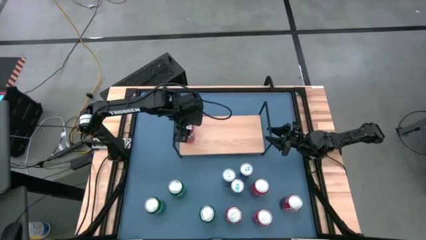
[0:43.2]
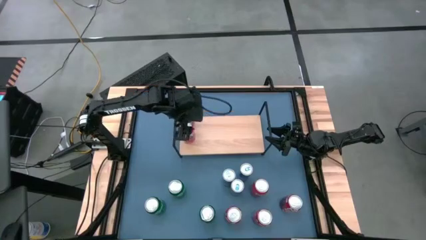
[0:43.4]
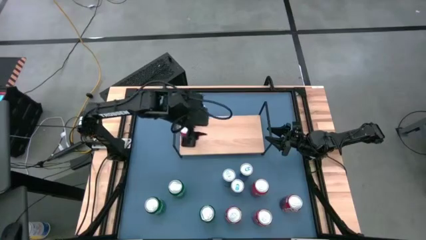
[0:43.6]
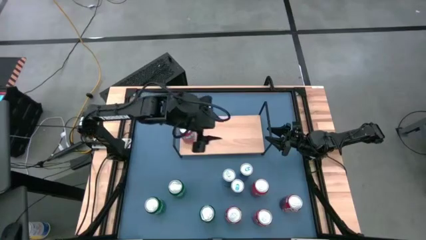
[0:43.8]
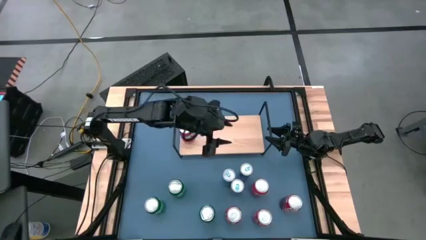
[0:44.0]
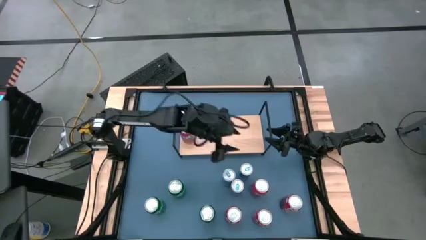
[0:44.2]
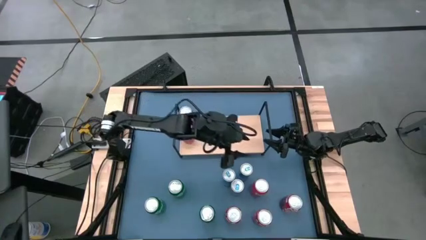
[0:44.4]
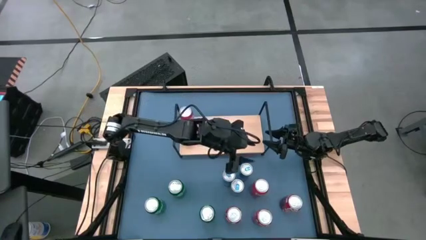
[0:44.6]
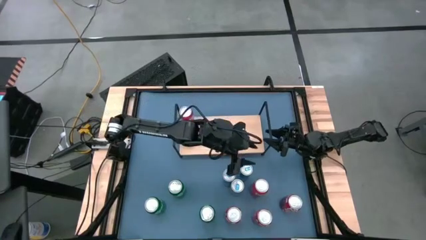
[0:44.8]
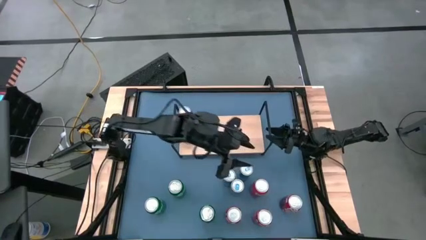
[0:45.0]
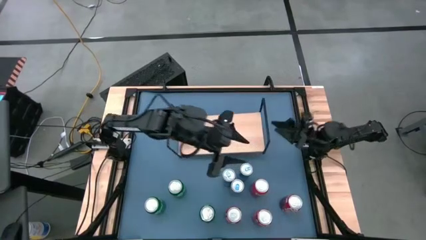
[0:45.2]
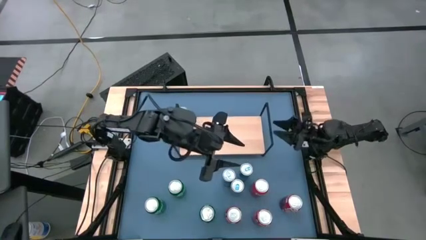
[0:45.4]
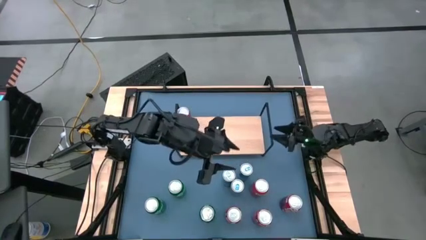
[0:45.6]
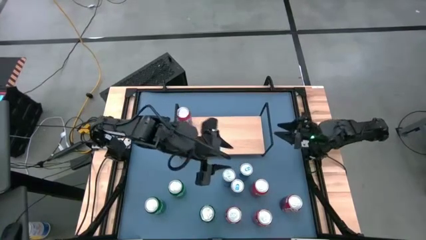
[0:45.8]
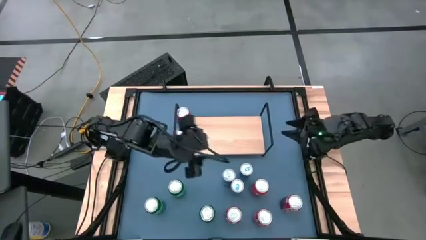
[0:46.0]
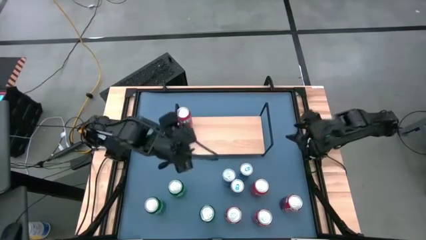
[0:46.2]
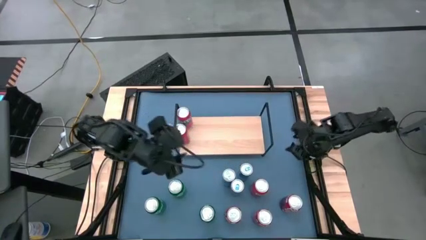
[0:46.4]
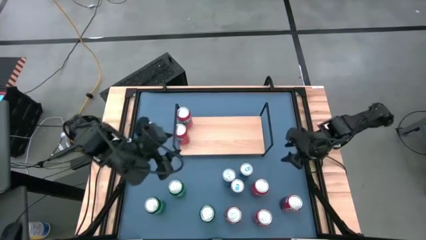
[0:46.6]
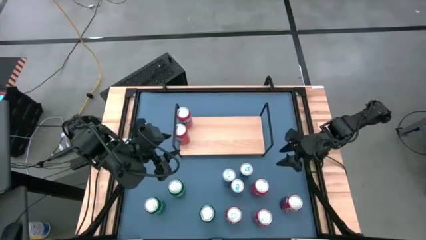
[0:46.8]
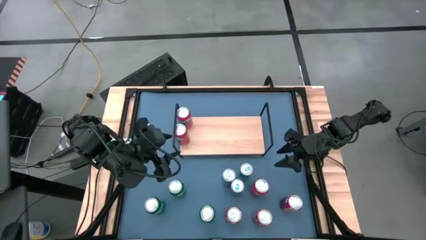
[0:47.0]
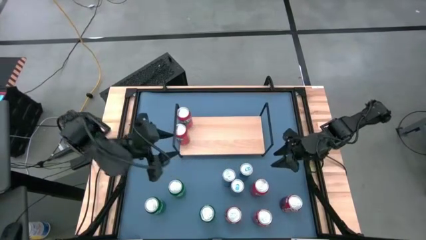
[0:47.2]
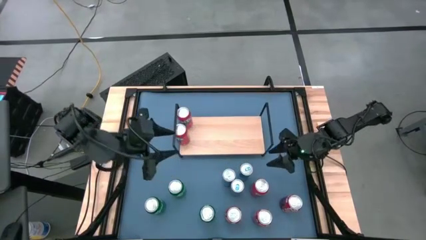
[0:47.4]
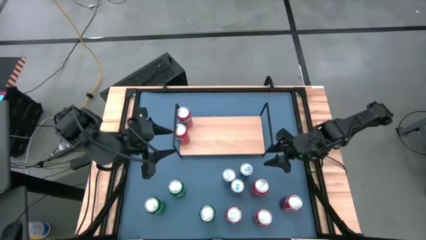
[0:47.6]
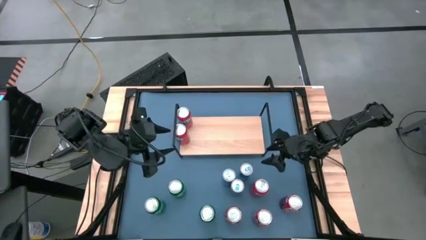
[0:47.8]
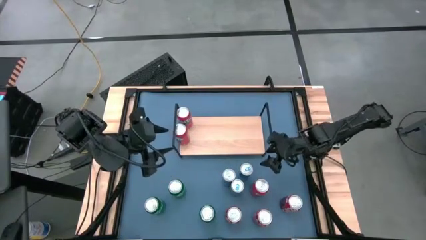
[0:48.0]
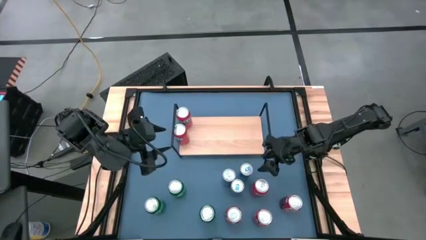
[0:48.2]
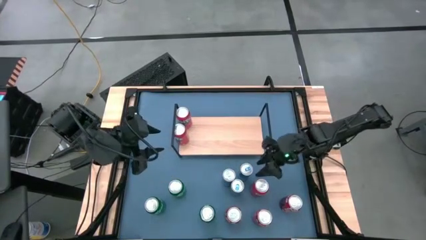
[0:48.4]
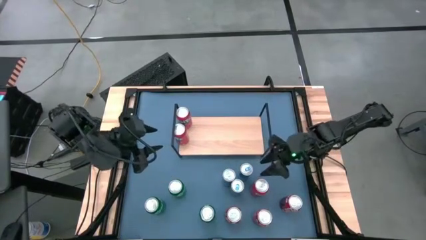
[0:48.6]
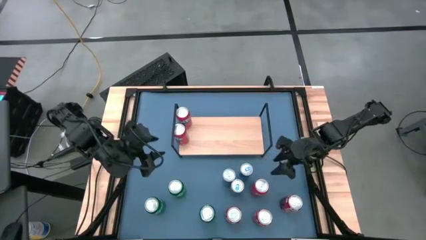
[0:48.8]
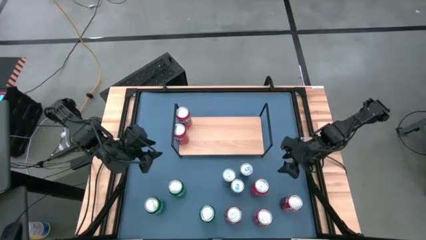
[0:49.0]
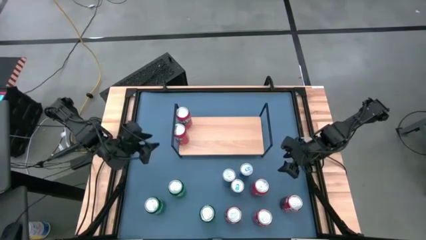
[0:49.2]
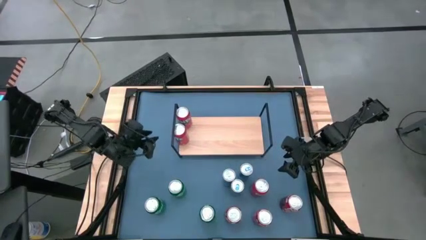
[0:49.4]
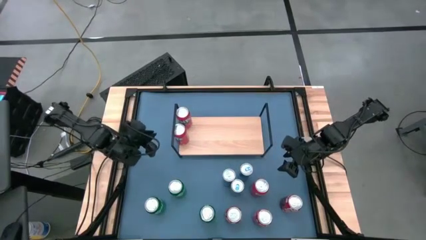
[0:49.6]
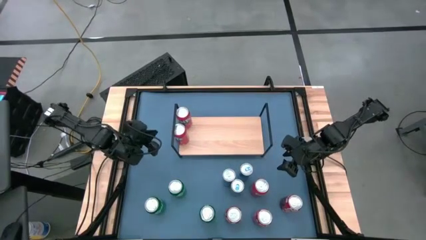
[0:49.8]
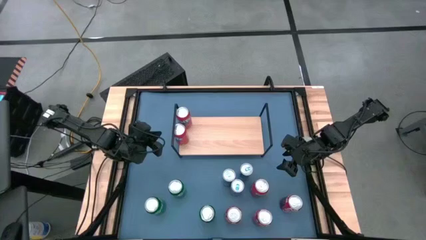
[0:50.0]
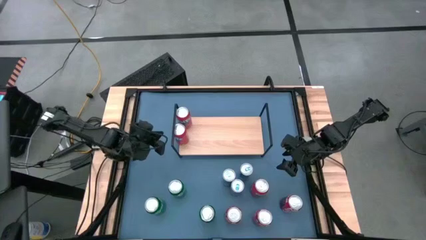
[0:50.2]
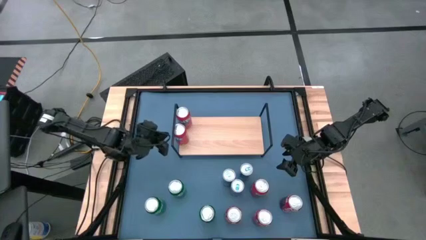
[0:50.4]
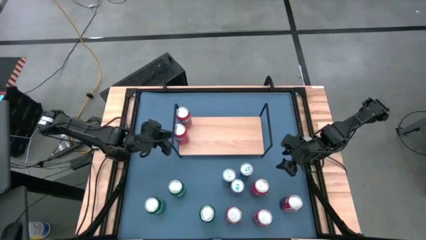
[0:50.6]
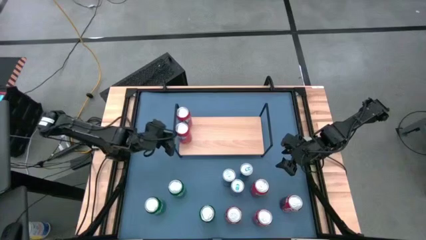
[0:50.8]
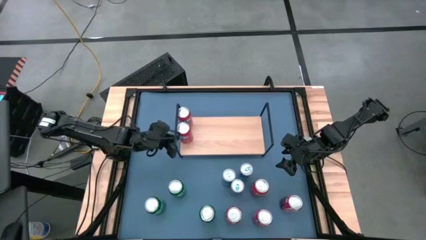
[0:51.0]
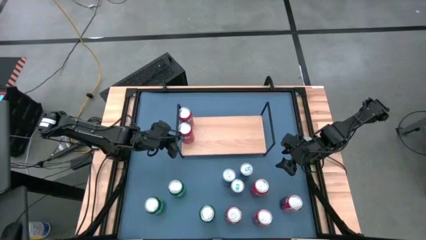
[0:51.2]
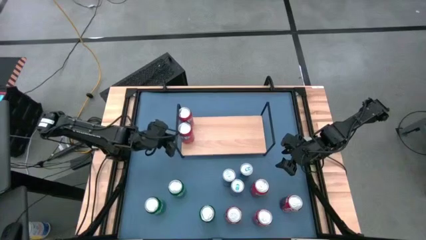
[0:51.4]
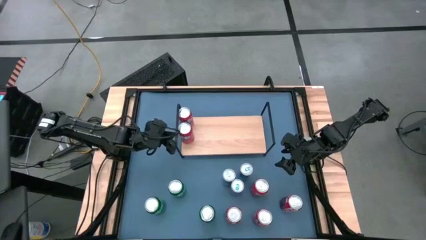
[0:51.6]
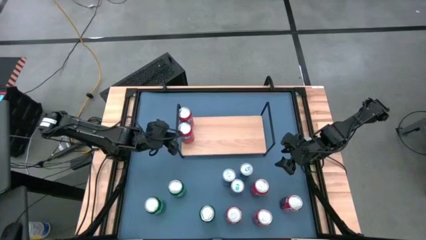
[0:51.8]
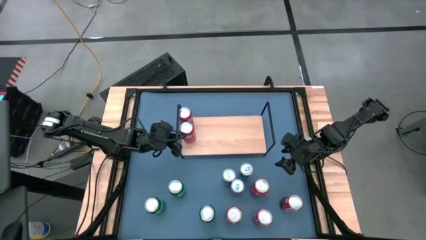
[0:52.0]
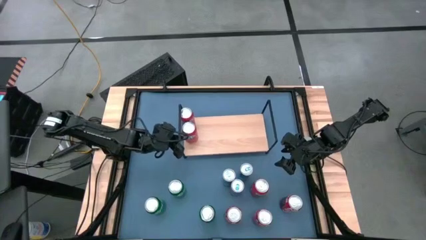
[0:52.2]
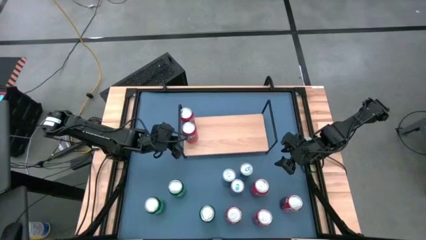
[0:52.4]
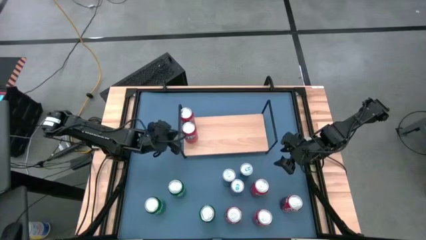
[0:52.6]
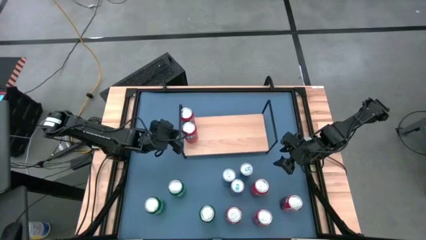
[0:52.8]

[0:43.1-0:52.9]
Task: Place canned beverage on shelf
Adjust the orange soda cans on the shelf

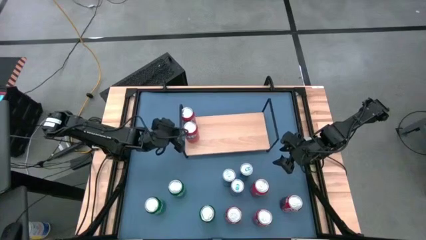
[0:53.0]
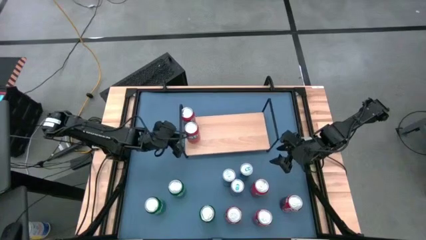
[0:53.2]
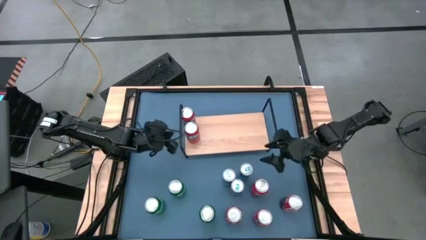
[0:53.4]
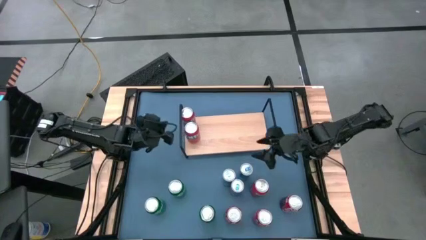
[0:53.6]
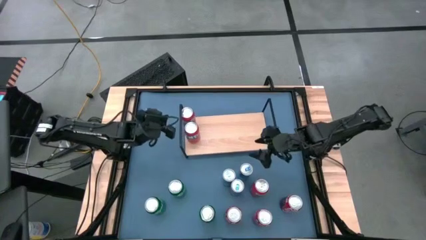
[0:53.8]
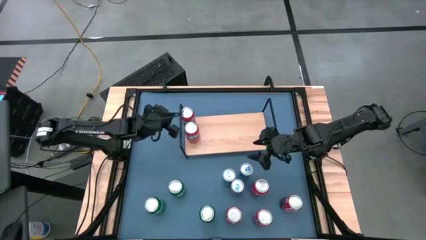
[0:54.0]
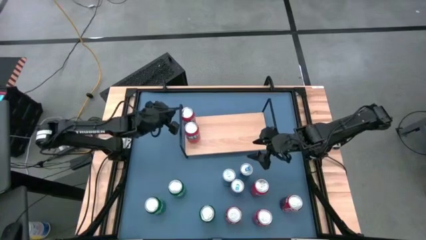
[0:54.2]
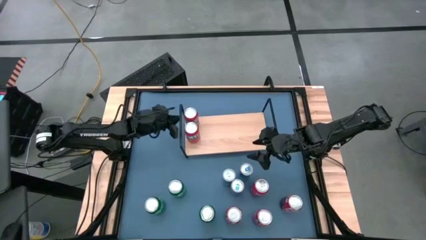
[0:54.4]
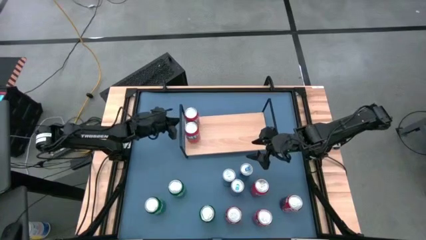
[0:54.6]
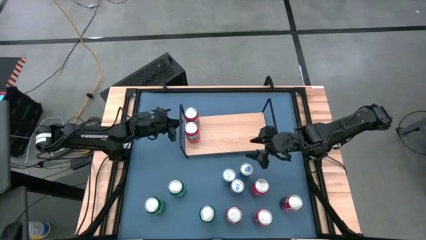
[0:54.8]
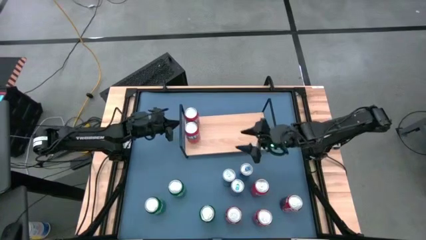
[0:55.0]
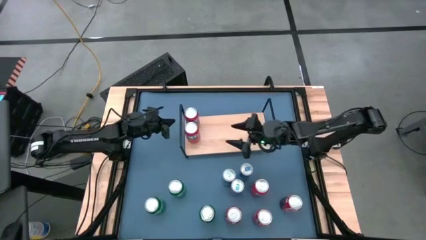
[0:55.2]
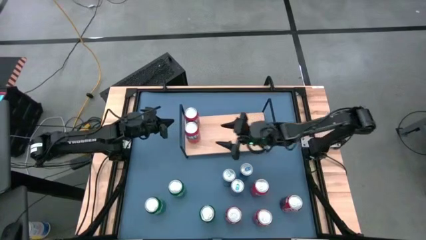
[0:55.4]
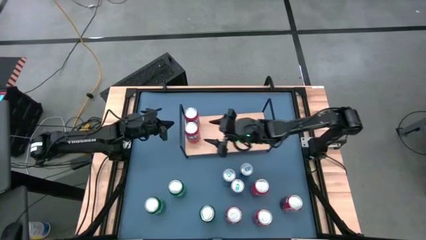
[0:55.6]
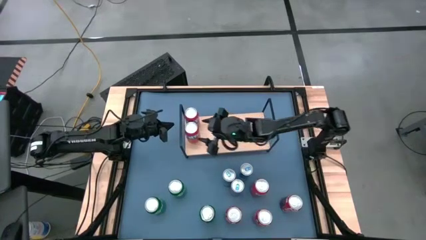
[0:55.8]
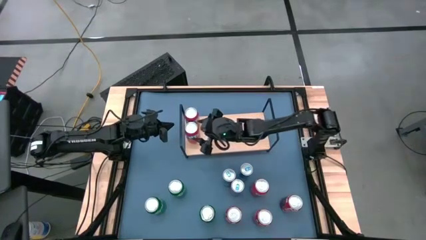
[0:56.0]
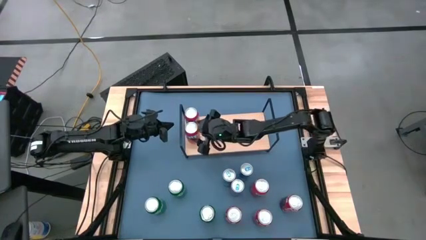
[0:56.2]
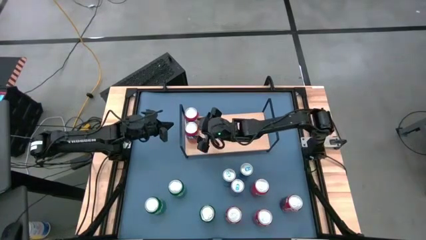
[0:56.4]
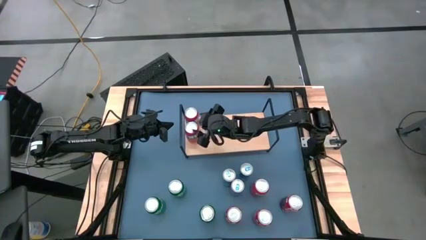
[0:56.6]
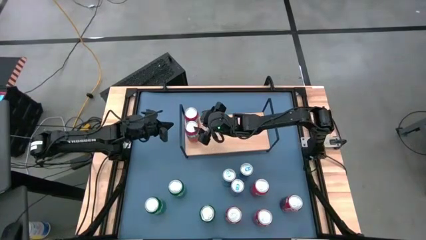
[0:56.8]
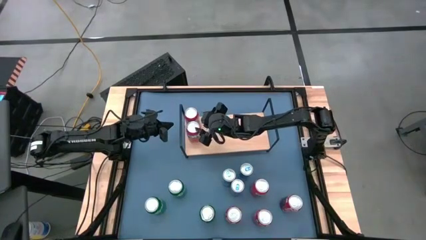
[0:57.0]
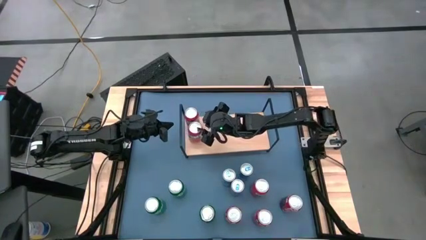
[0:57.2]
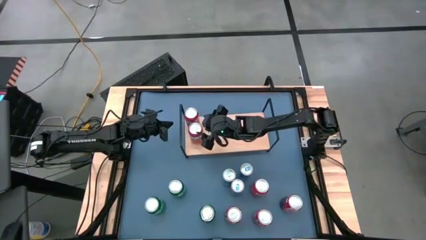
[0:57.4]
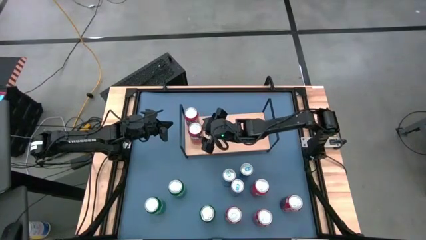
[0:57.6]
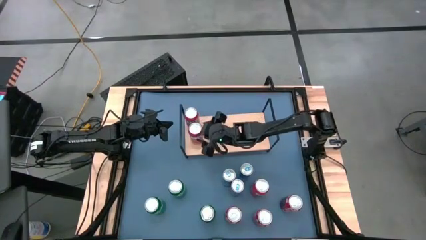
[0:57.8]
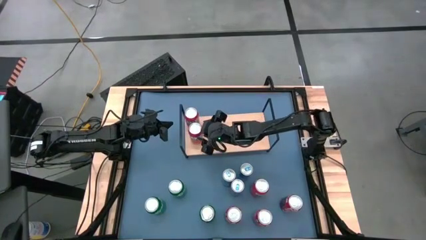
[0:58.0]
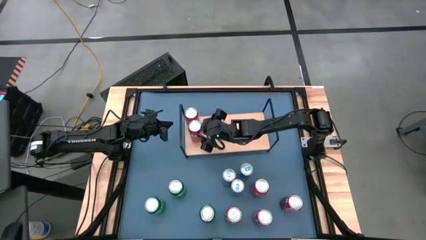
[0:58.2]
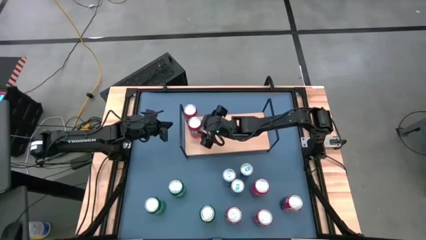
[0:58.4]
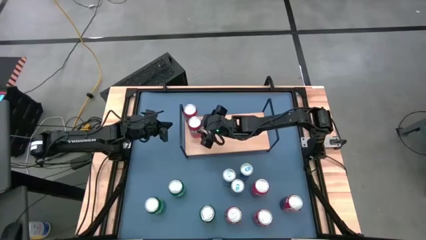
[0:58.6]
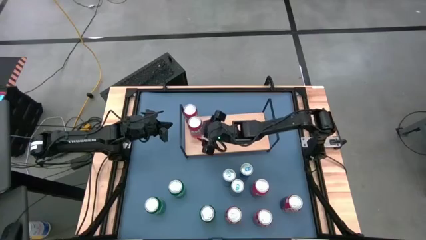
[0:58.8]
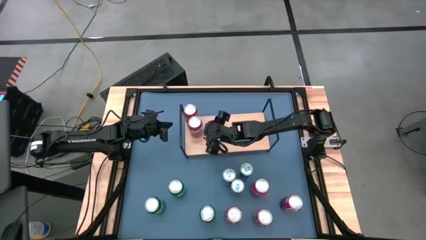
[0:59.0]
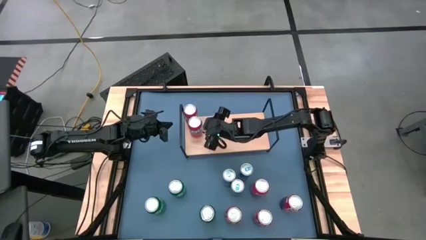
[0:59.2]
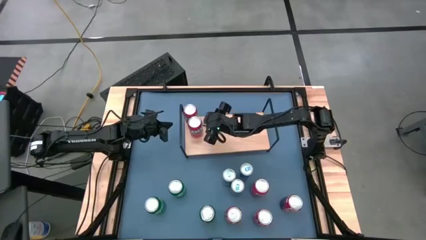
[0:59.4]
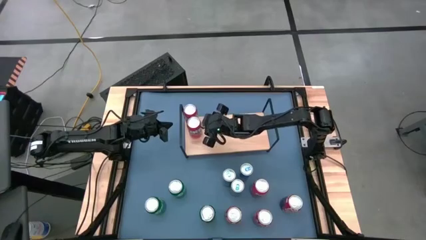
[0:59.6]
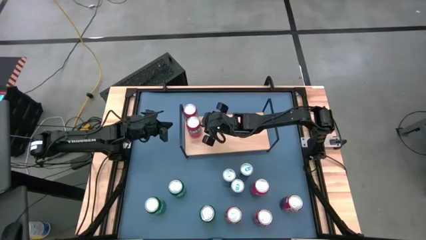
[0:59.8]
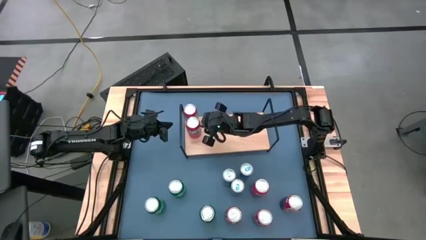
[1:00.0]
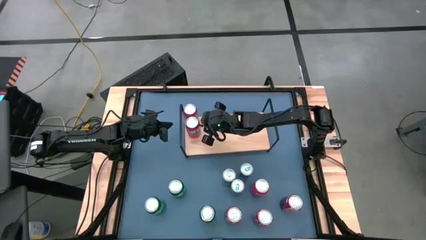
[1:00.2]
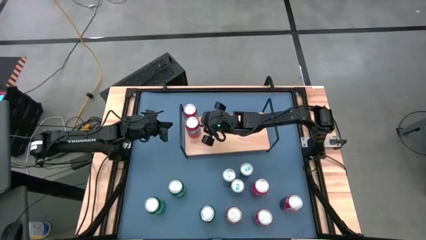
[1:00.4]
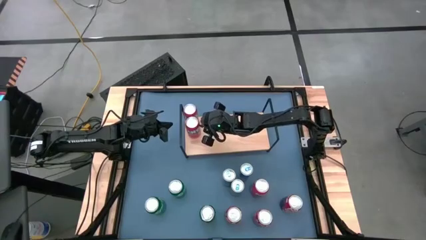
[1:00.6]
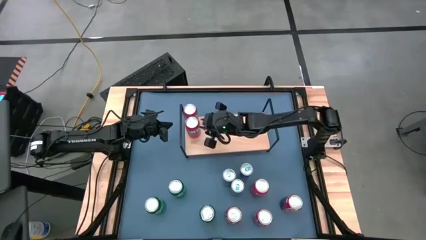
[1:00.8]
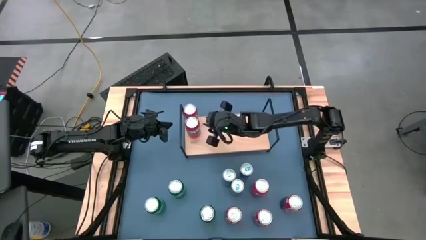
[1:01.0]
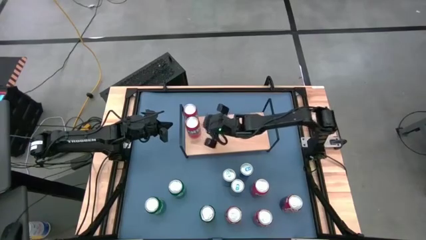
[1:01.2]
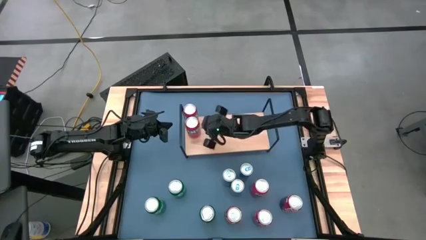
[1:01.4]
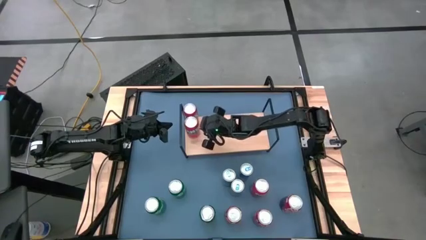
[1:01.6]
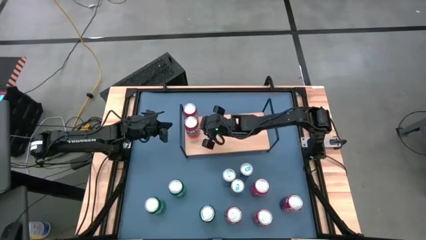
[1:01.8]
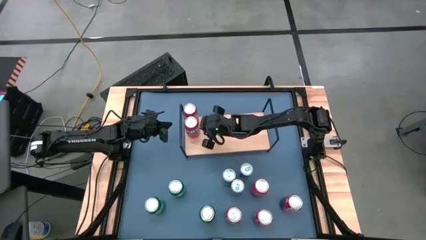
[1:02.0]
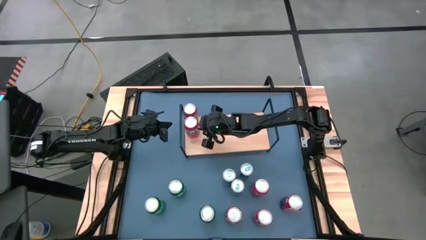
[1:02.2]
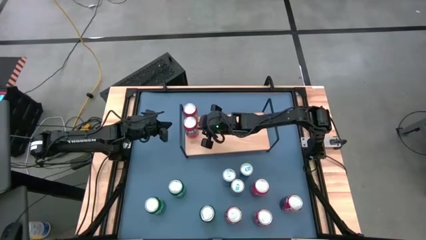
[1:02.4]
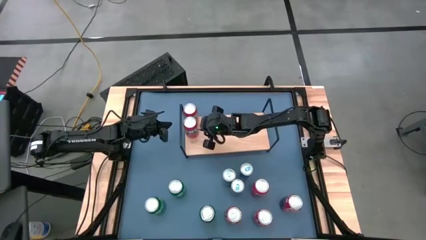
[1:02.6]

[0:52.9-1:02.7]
Adjust the orange soda cans on the shelf
